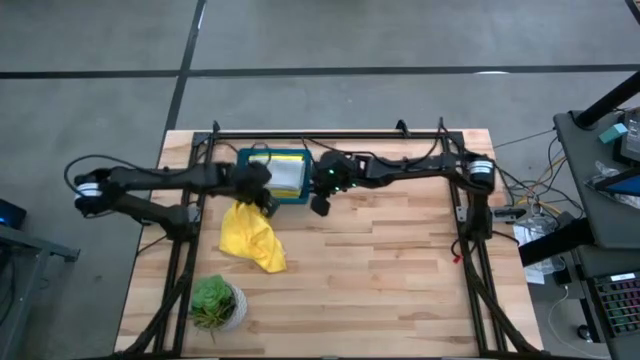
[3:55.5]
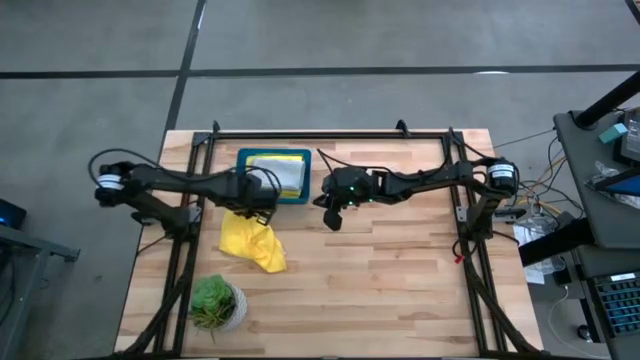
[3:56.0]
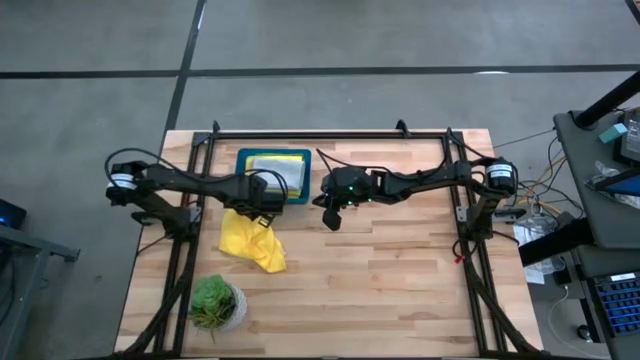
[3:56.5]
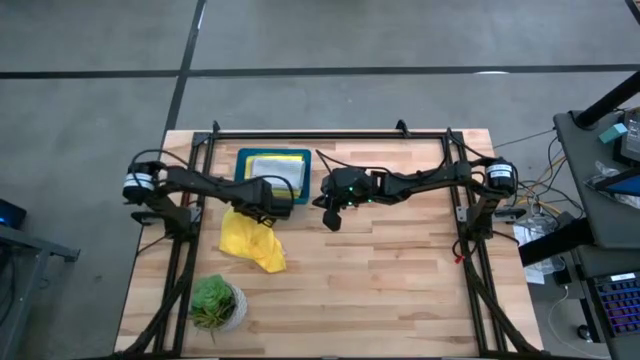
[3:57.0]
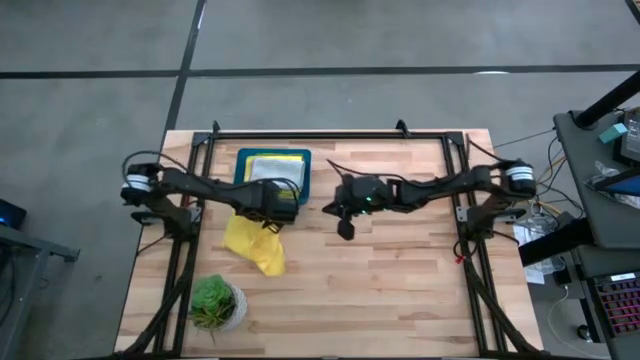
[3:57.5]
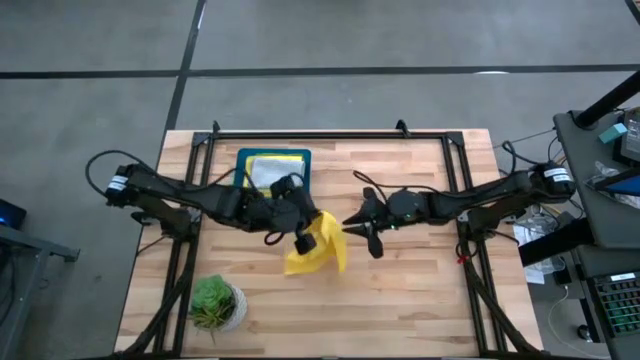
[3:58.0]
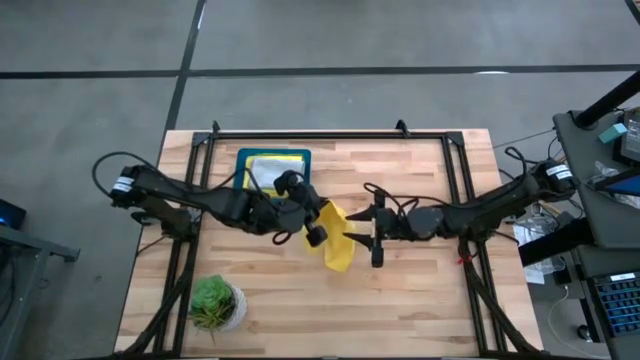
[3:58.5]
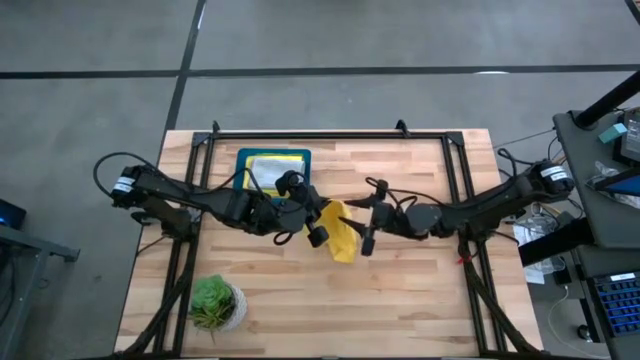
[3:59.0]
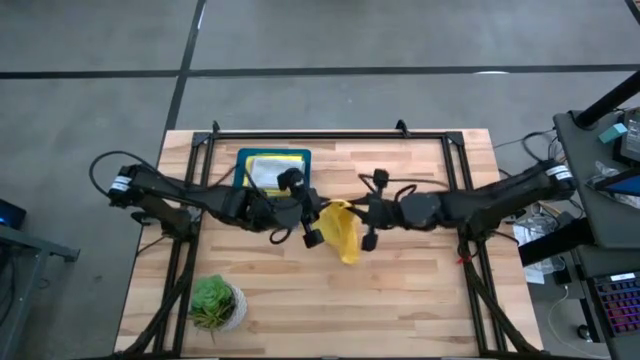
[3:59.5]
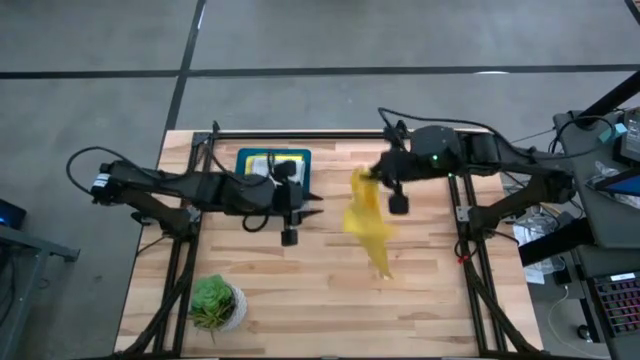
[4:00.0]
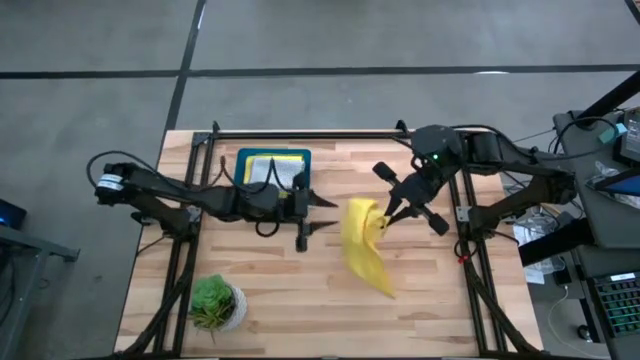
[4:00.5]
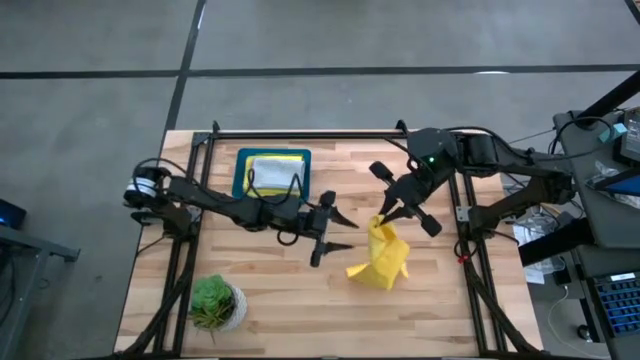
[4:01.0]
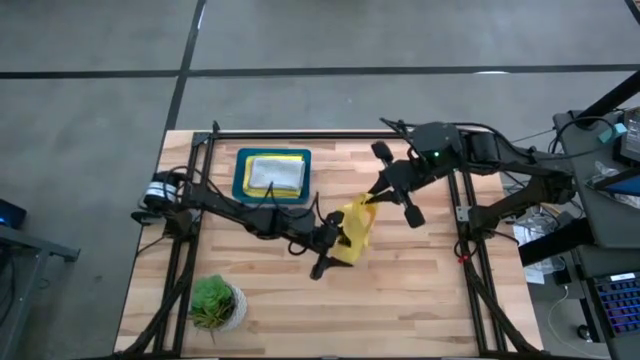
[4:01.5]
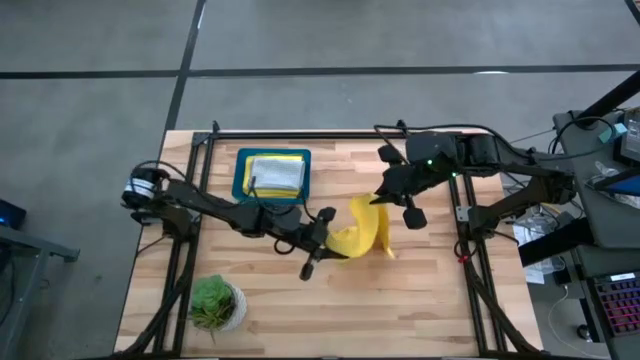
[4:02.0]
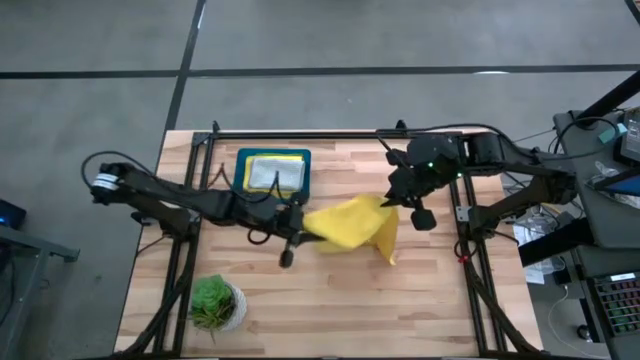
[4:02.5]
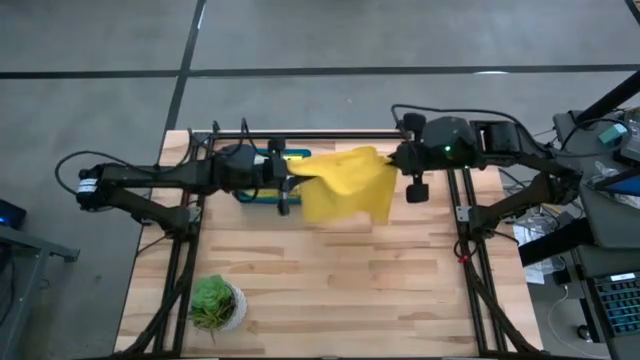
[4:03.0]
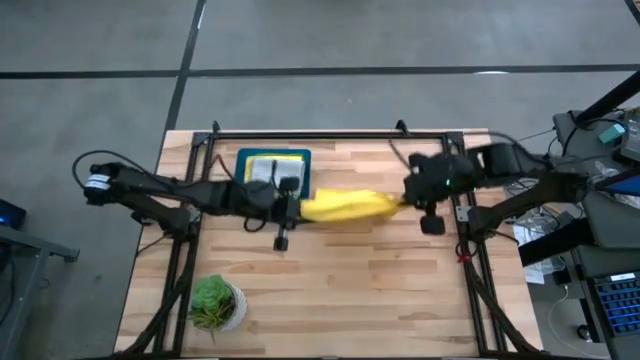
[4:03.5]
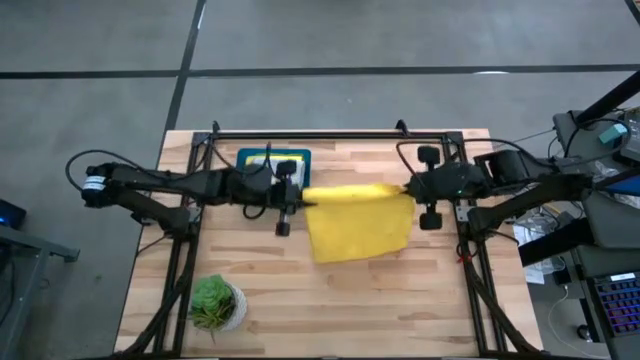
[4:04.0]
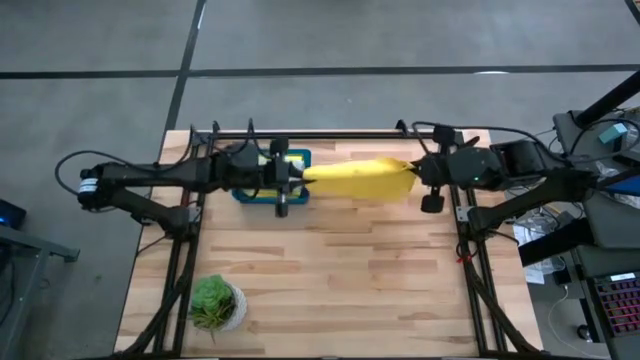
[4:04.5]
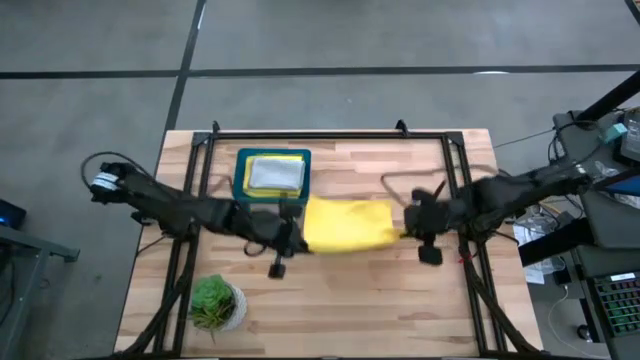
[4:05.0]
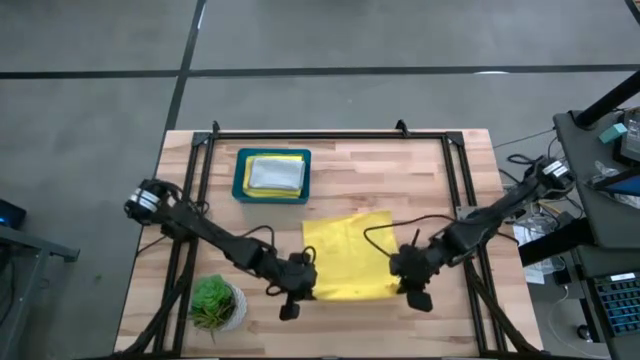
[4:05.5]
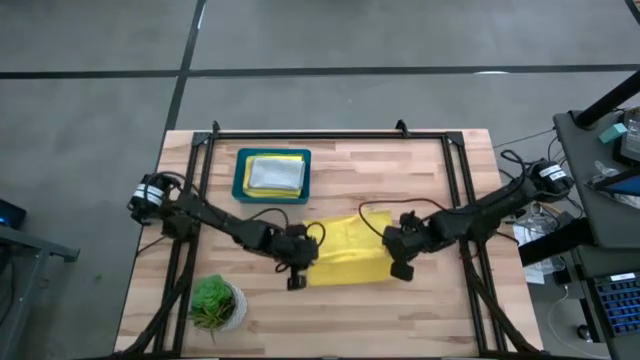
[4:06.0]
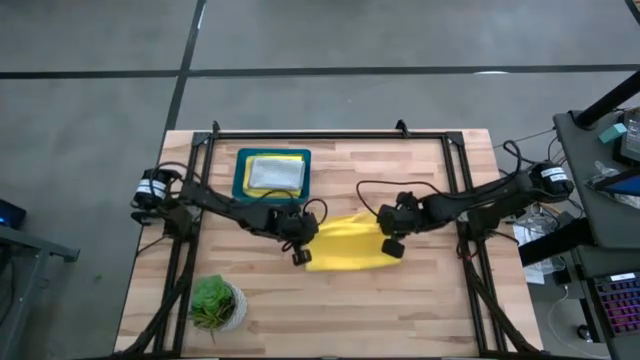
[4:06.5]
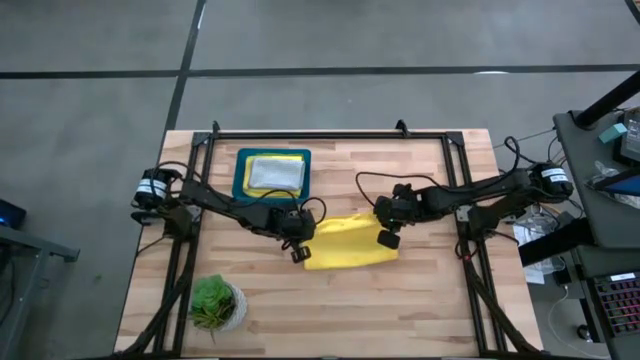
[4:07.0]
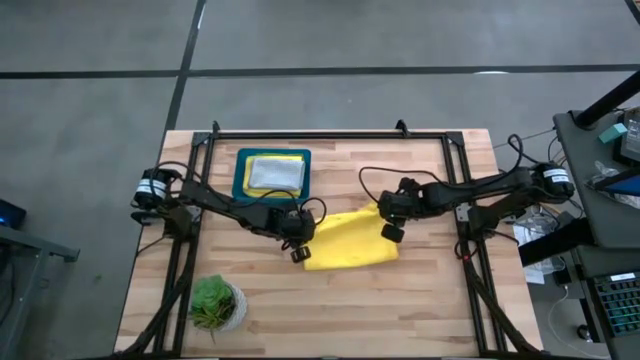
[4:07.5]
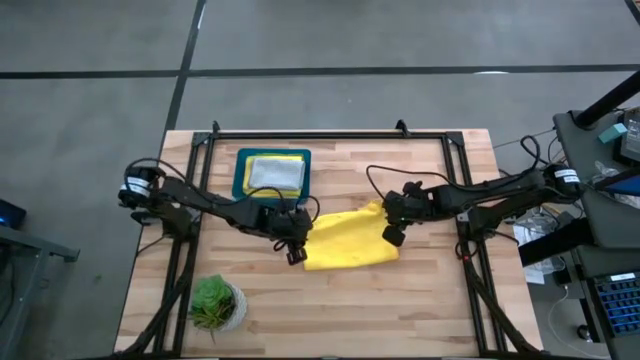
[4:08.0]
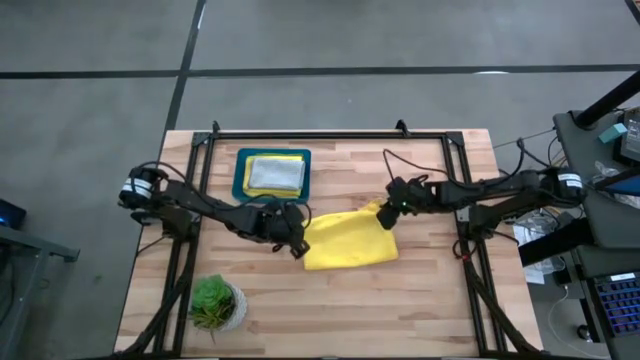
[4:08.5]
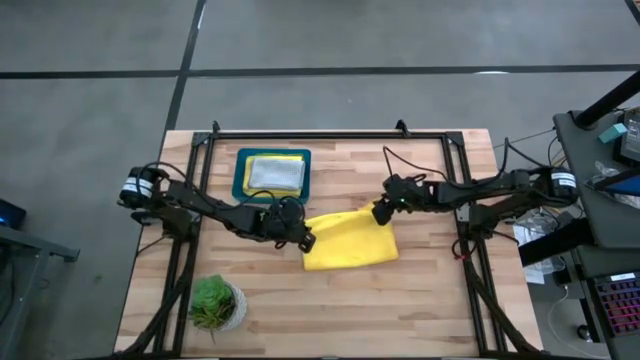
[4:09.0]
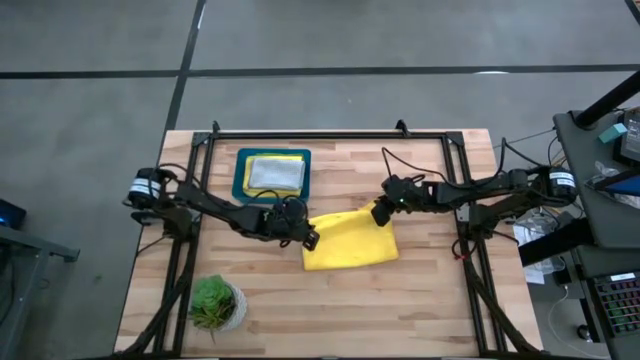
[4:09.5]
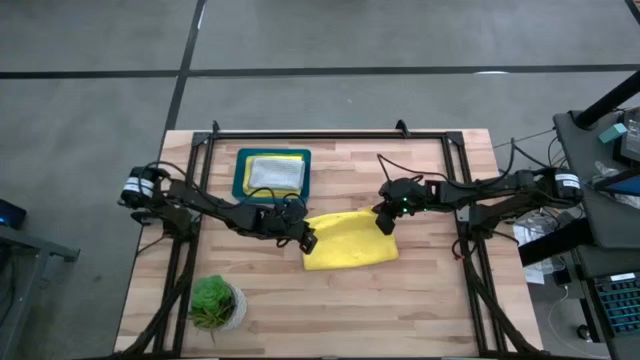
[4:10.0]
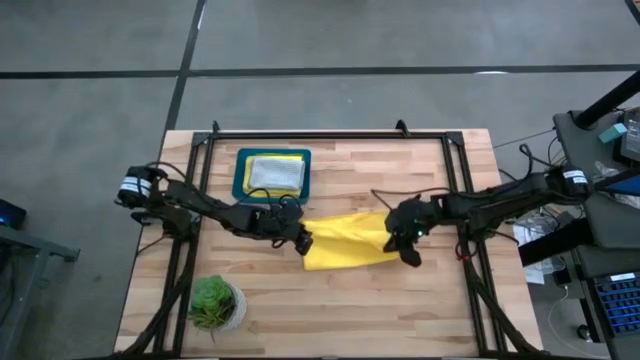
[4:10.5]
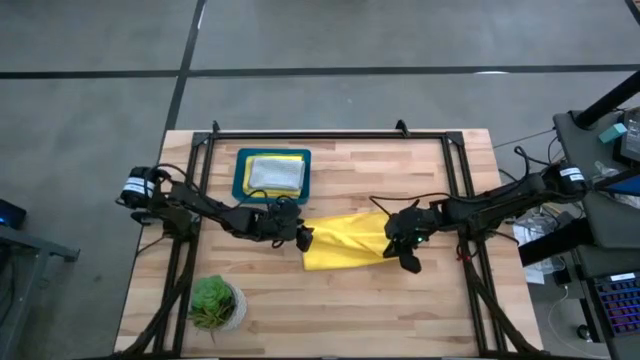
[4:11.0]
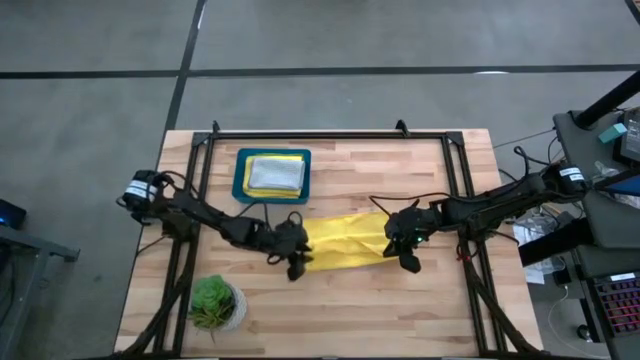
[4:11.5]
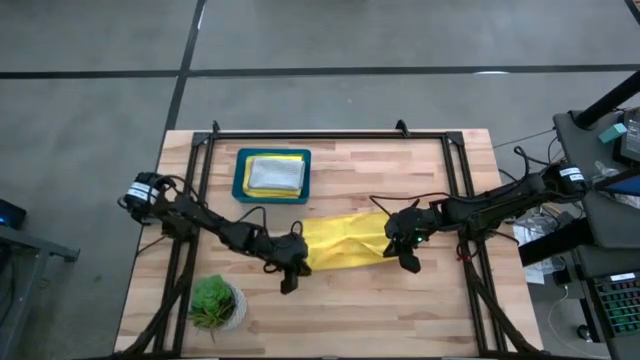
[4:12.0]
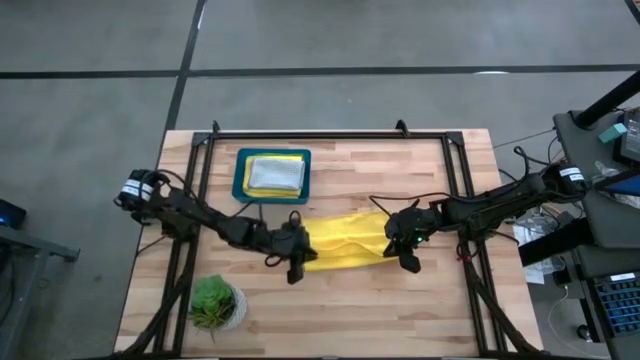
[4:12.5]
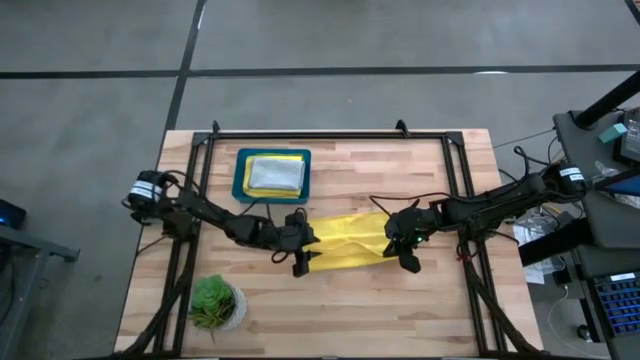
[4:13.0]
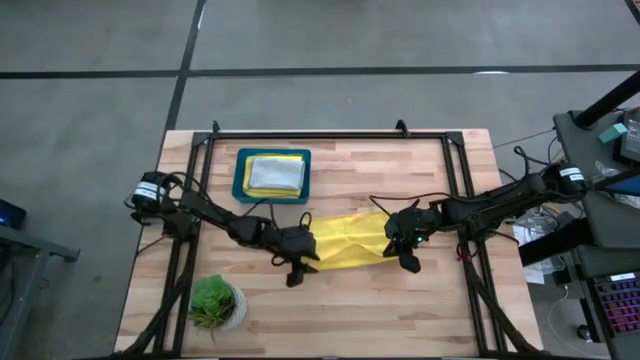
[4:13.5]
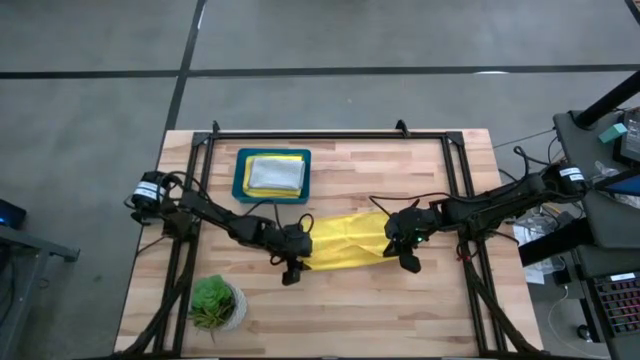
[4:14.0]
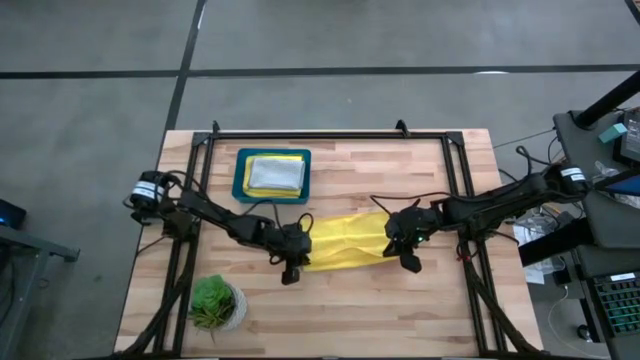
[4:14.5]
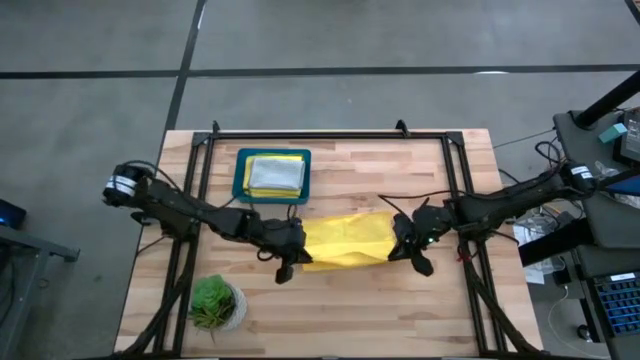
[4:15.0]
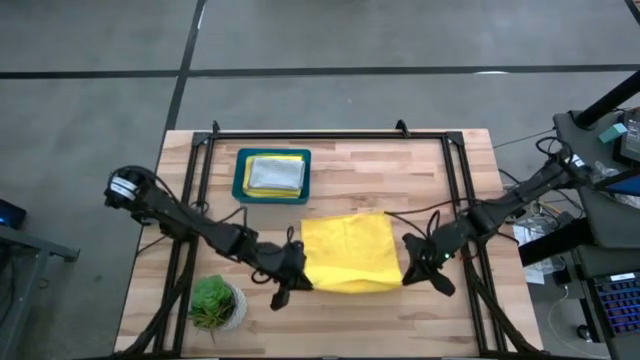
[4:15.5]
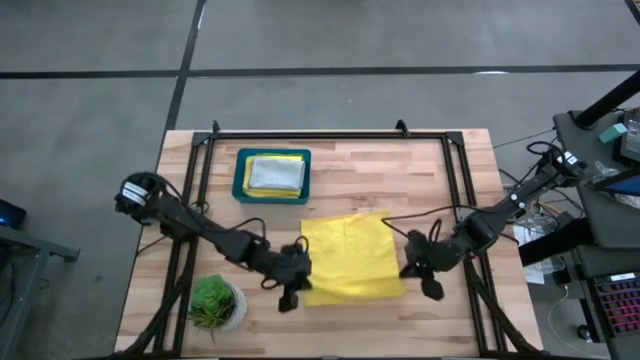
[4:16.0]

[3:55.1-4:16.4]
Task: Fold microfiber towels
Fold the yellow microfiber towel

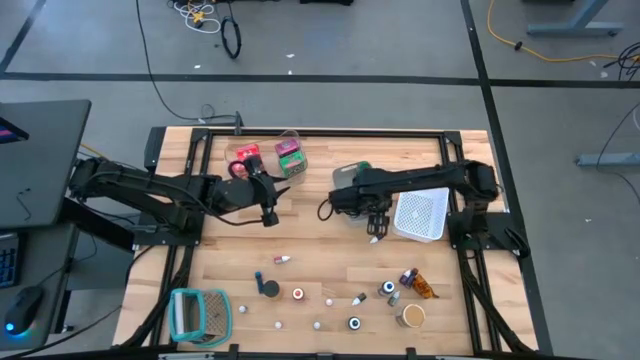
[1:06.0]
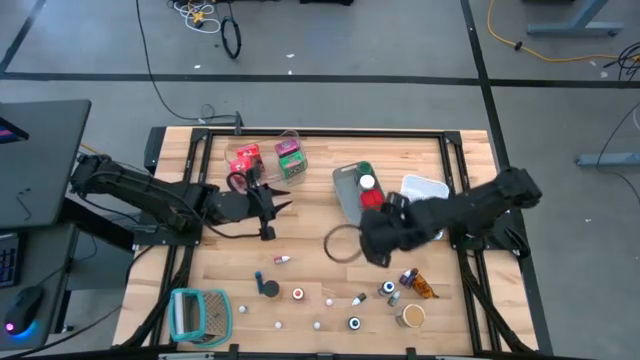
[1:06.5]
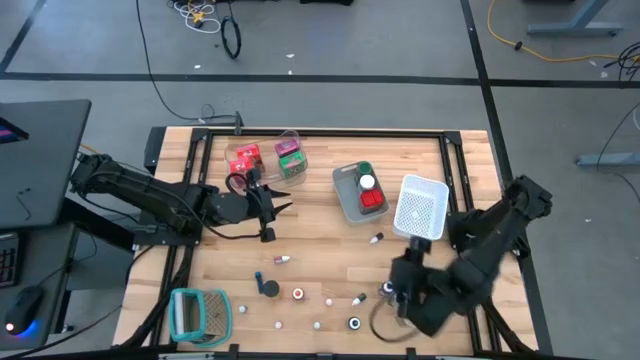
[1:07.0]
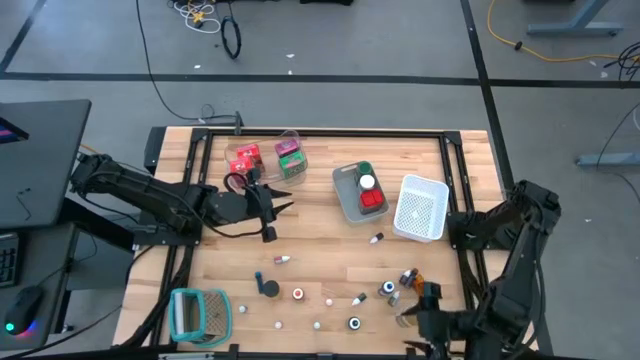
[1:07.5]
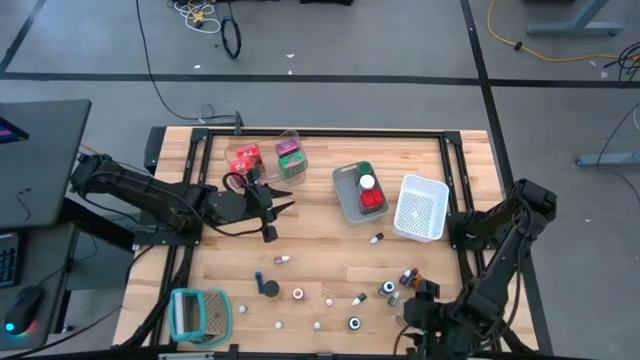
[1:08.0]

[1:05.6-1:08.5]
Task: Pick & Place Kitchen Items
Put the gold spice bottle into the gray bin
